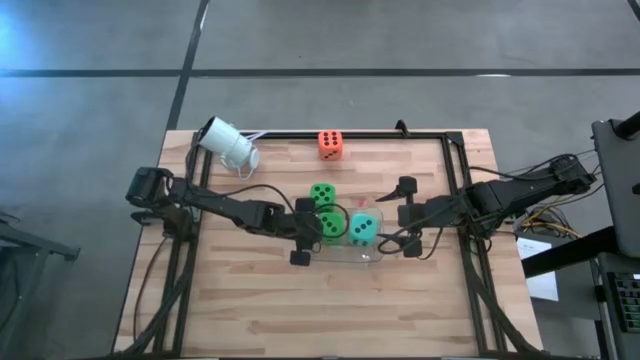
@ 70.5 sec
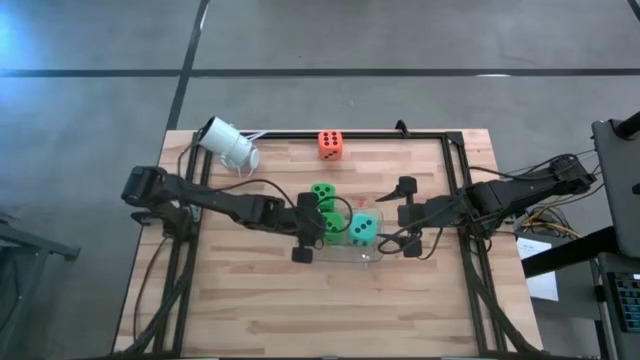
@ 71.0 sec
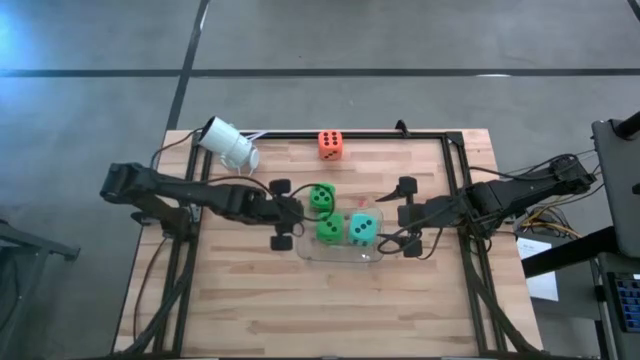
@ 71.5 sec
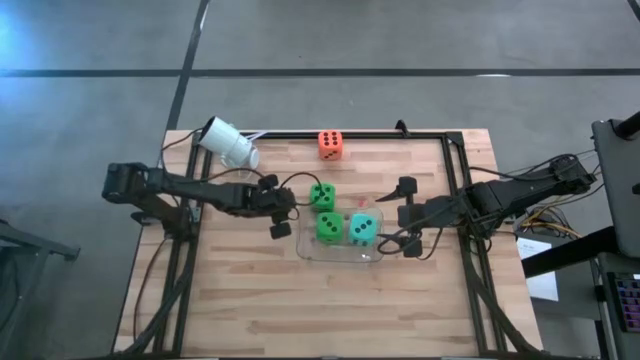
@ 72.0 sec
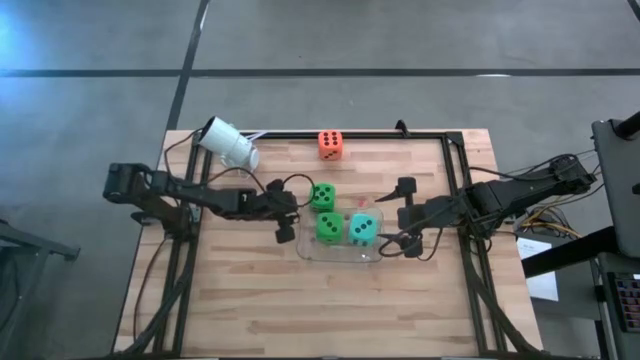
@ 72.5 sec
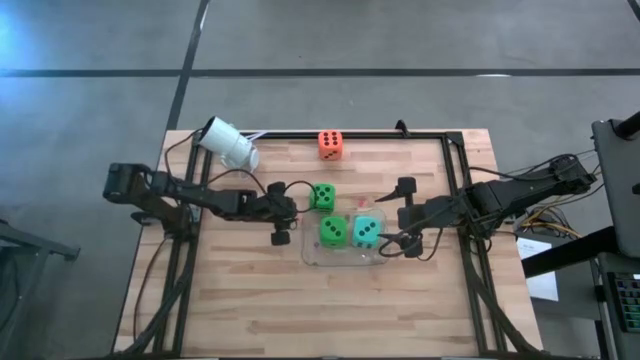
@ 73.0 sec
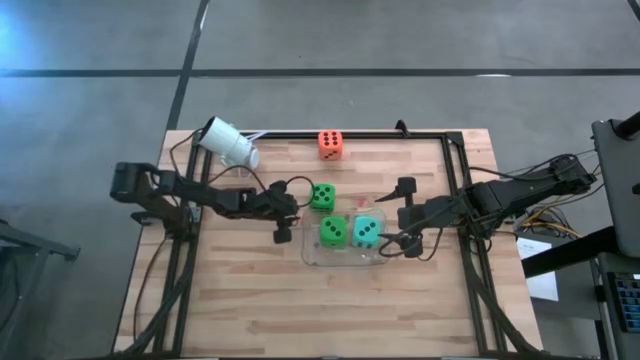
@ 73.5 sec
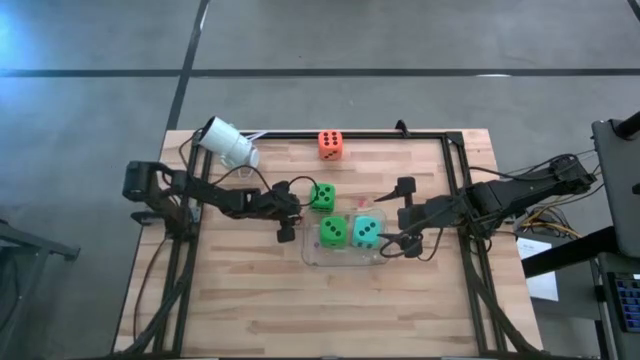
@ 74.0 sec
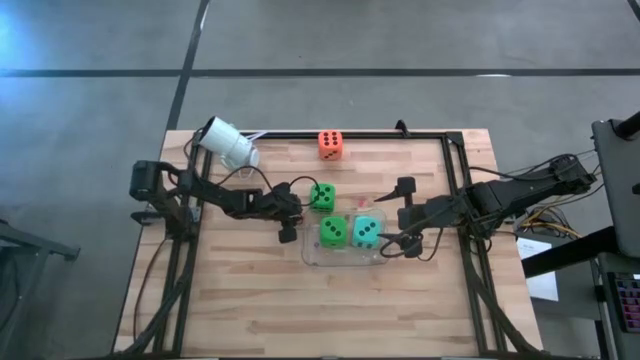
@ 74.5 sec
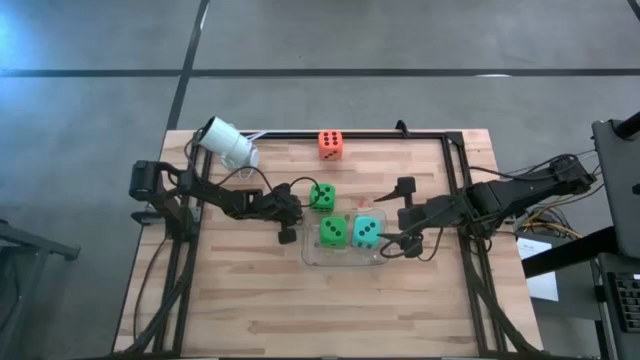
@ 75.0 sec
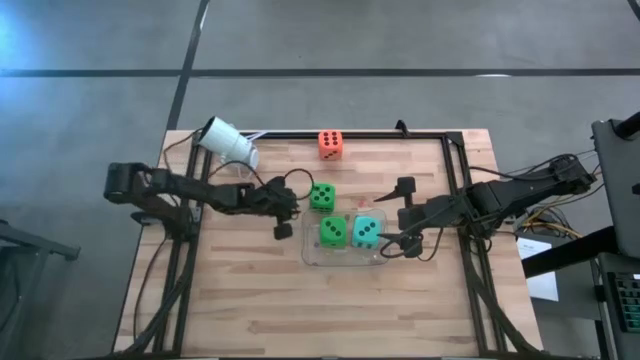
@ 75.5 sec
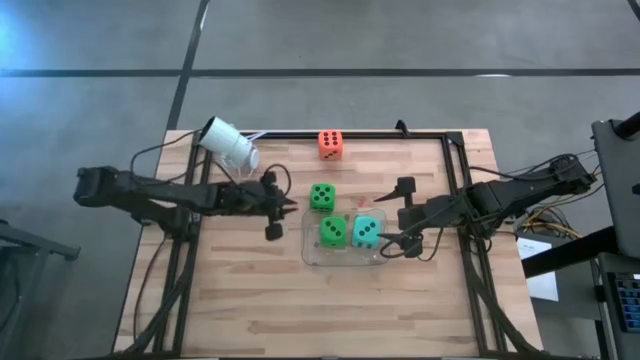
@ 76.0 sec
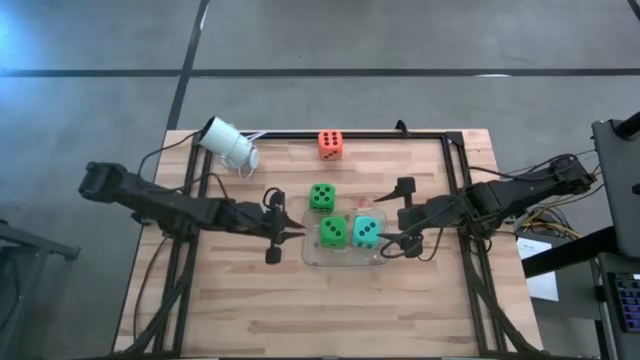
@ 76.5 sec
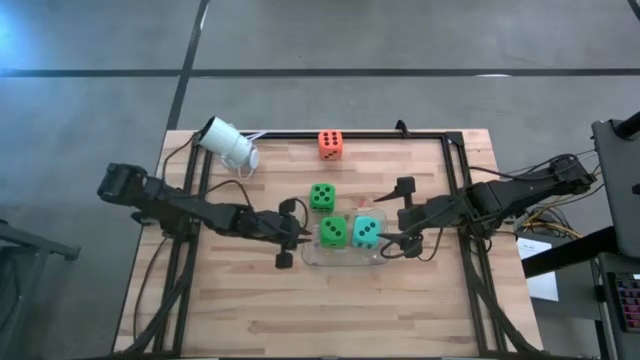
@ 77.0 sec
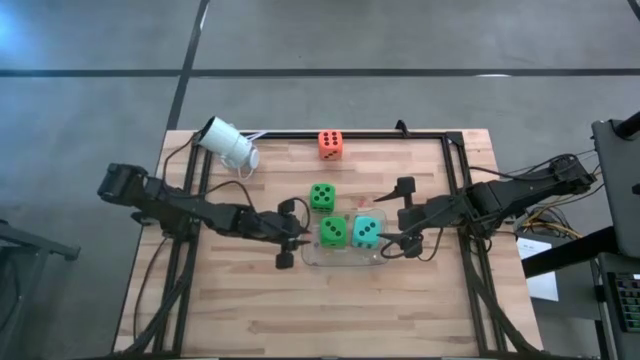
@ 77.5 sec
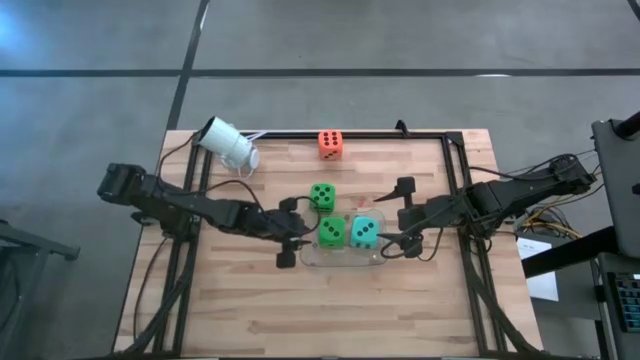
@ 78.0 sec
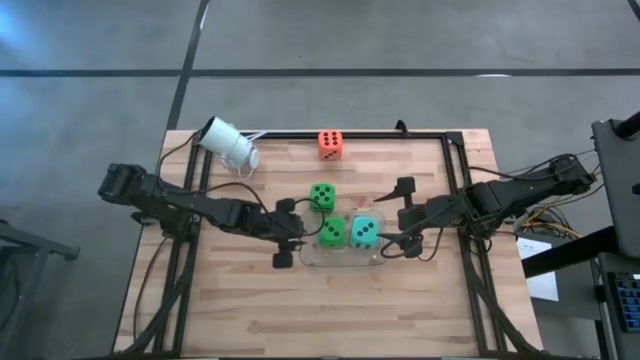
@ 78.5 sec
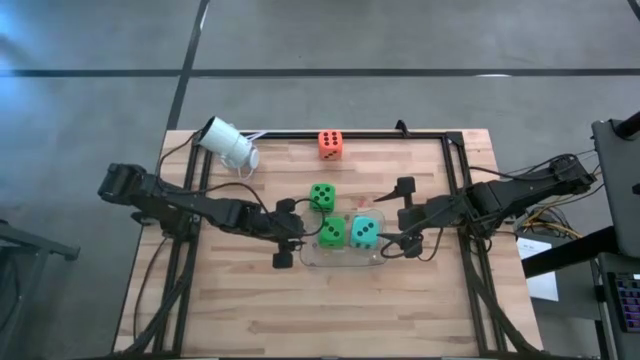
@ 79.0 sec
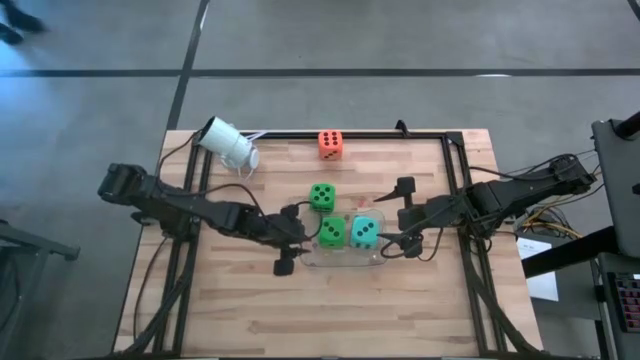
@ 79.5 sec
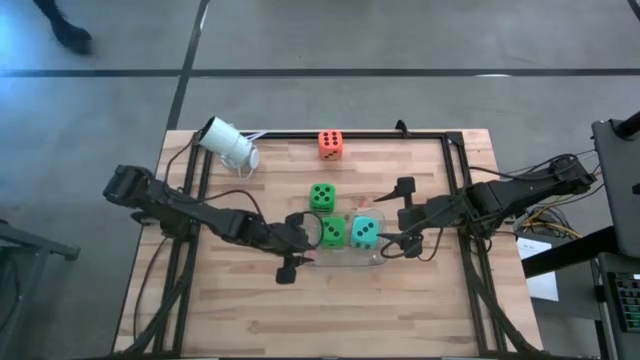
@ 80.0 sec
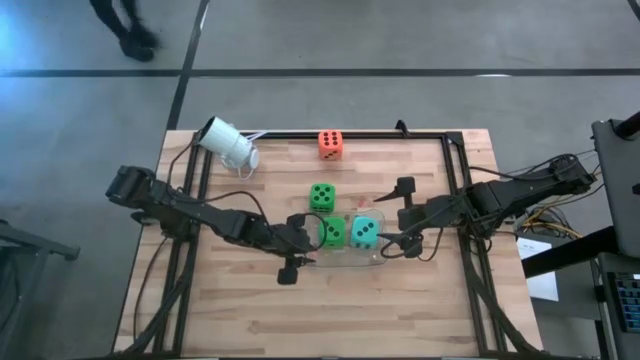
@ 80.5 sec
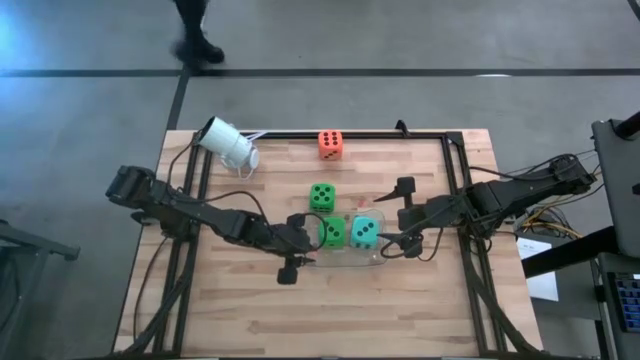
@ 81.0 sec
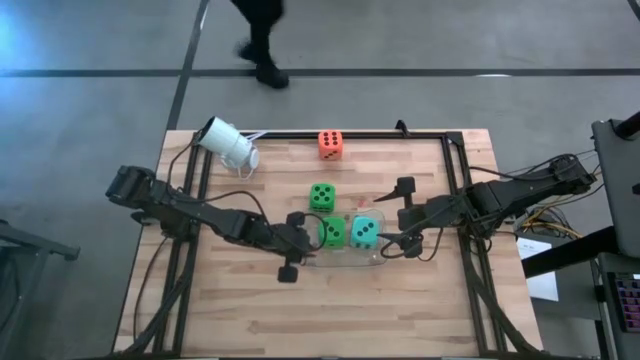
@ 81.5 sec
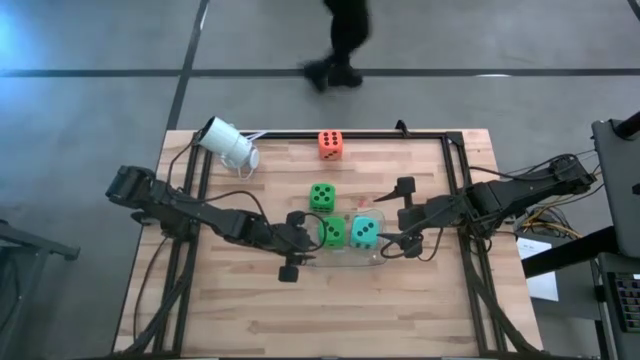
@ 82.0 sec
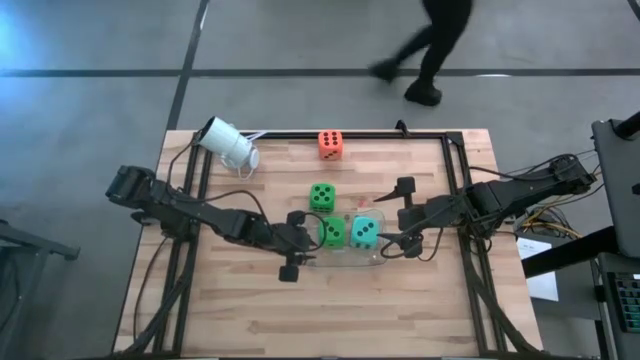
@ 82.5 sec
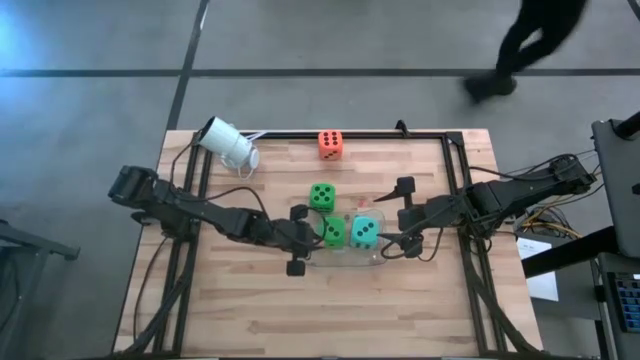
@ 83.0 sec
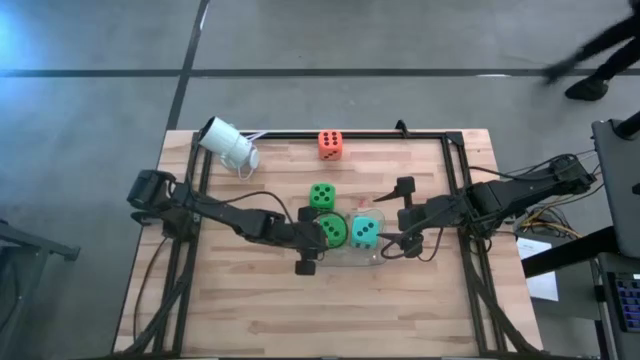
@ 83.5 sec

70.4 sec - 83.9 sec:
Task: Pick & Place Dice
Put the small orange die into the transparent bin

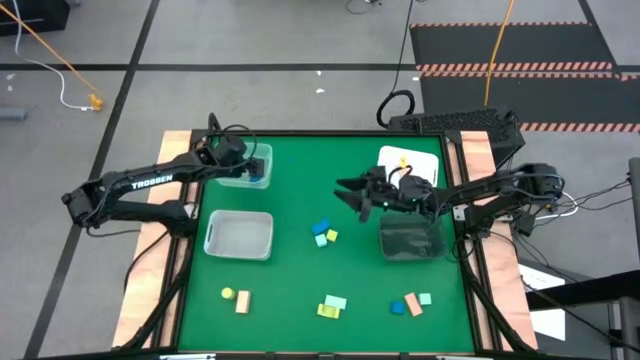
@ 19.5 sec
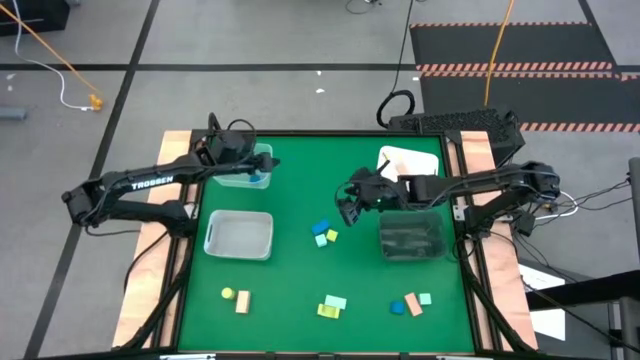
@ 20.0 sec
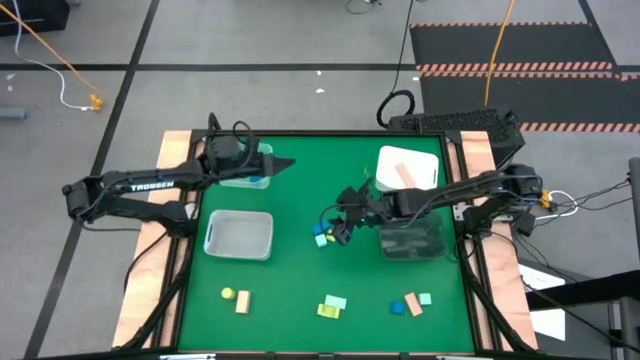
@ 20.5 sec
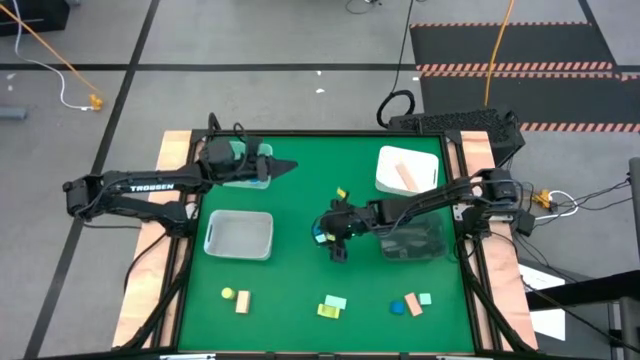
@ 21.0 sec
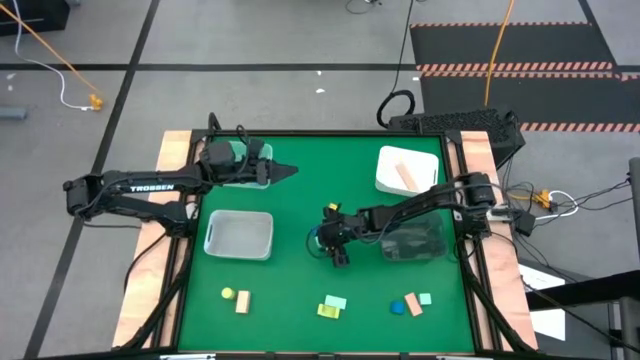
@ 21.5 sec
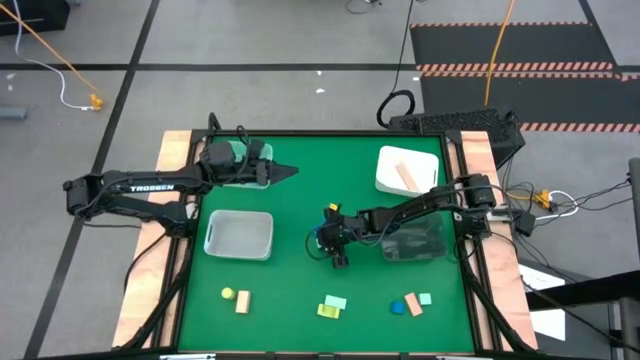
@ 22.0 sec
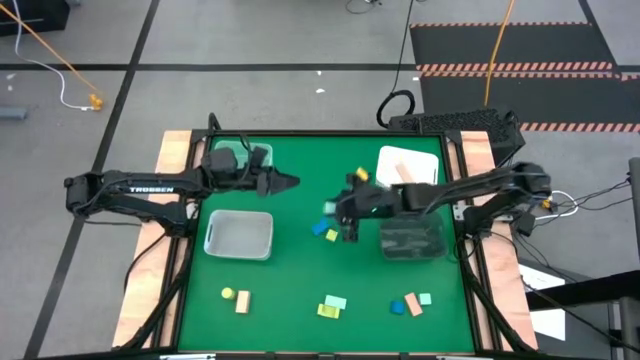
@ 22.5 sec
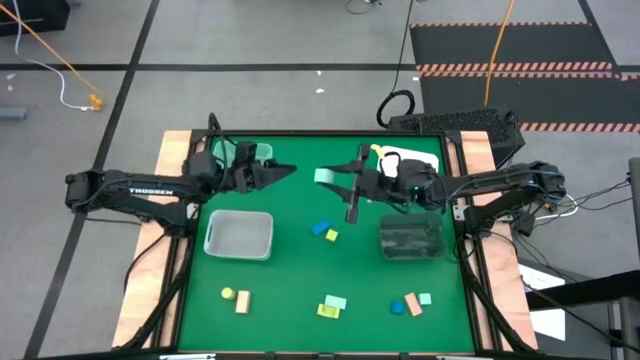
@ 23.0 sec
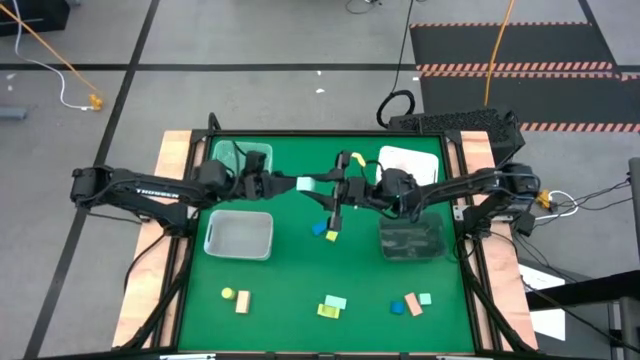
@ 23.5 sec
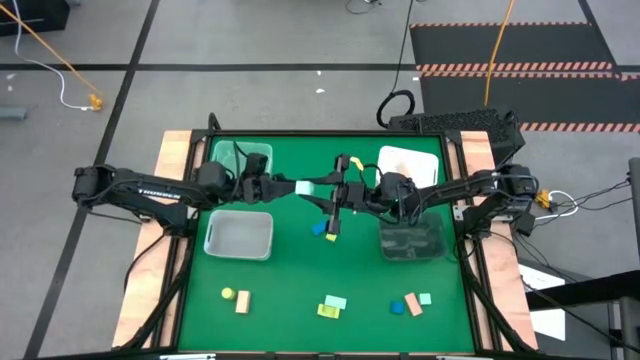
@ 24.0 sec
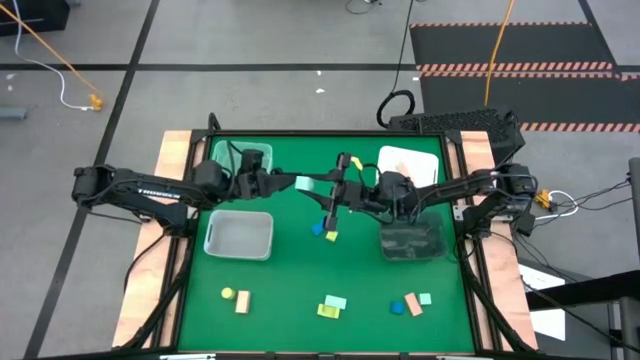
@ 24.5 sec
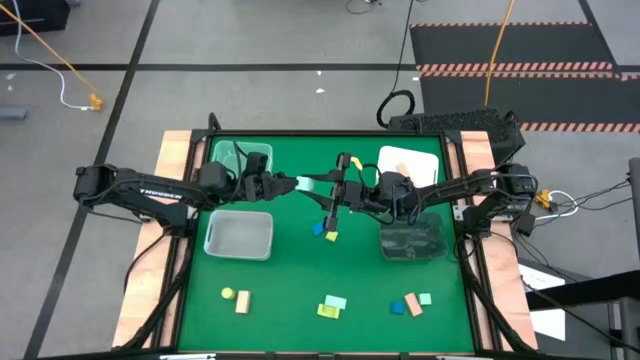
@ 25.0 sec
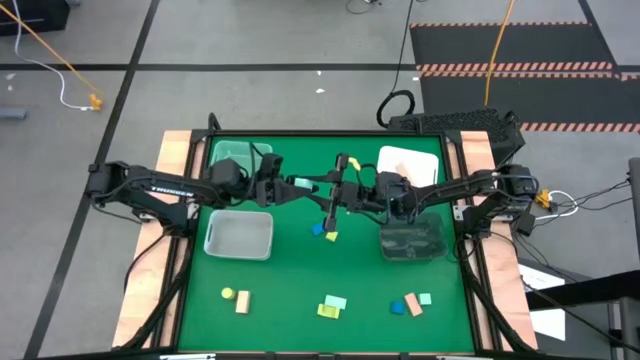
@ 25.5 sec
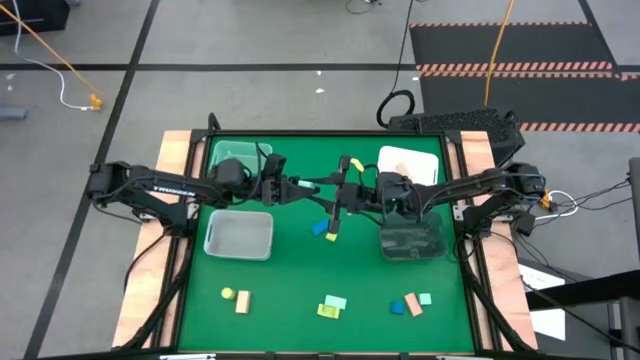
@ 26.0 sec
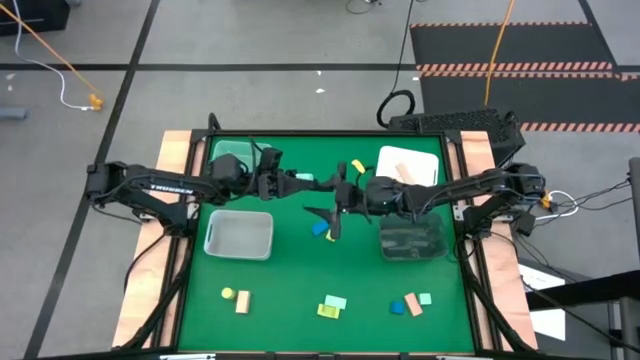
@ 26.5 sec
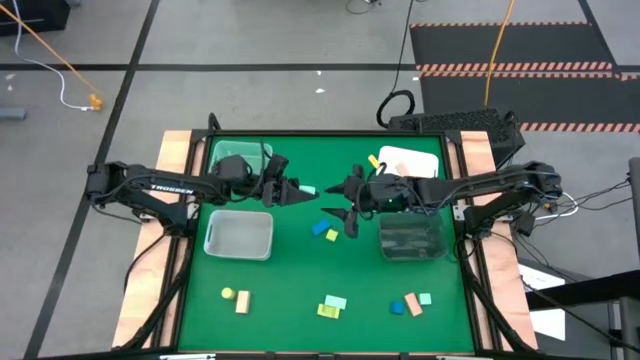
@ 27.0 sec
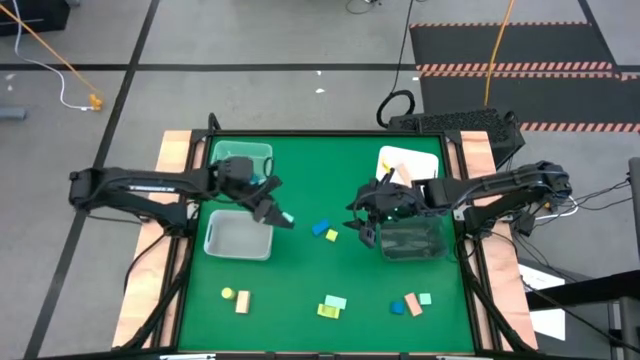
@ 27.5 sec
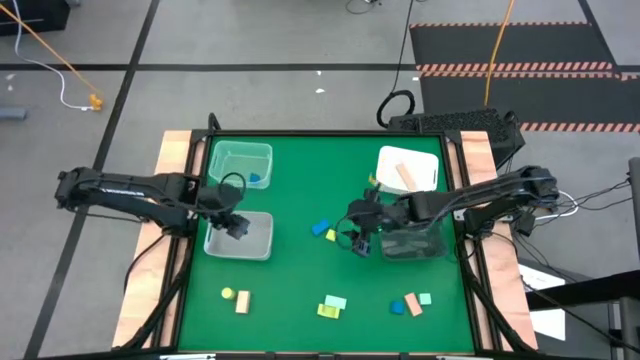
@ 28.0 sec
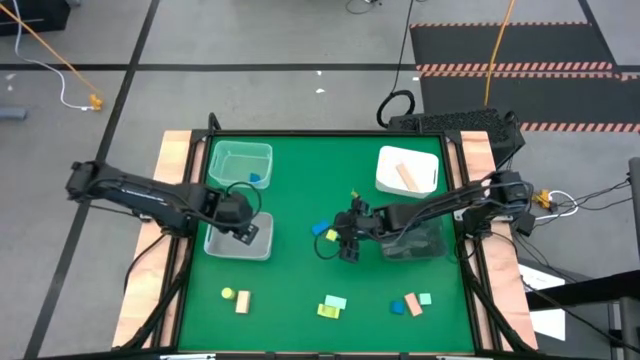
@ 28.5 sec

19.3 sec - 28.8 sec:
Task: Sort & place blocks by color
Put the top light blue block into the gray bin
